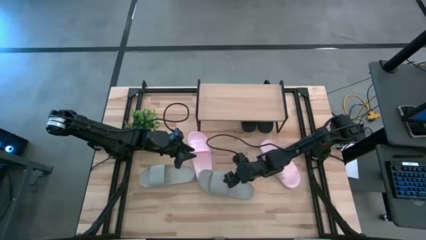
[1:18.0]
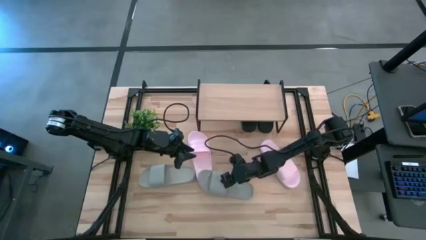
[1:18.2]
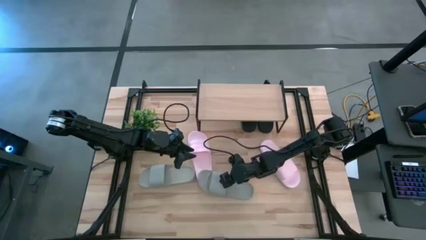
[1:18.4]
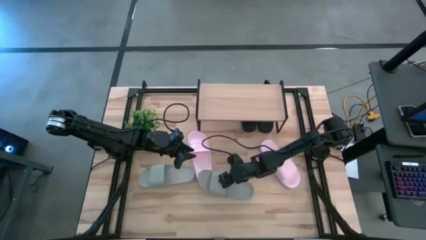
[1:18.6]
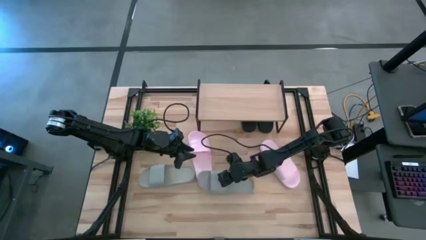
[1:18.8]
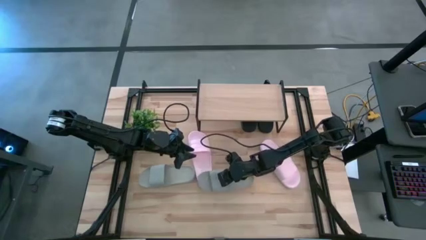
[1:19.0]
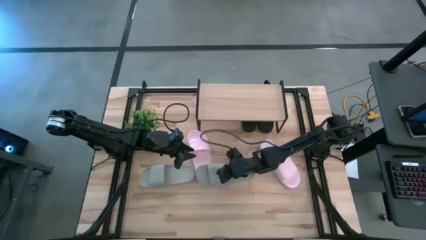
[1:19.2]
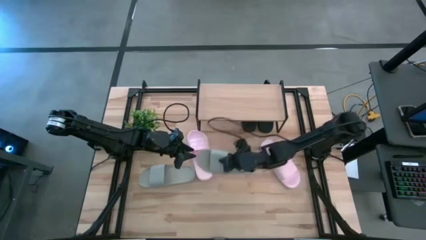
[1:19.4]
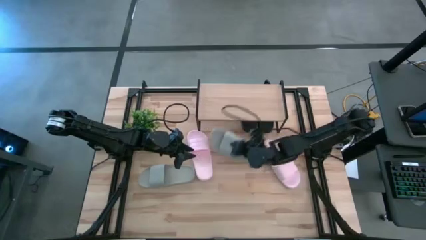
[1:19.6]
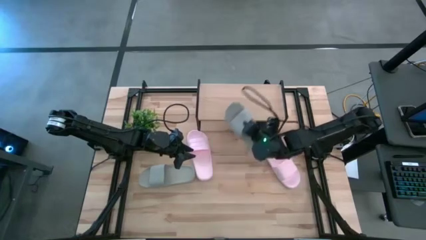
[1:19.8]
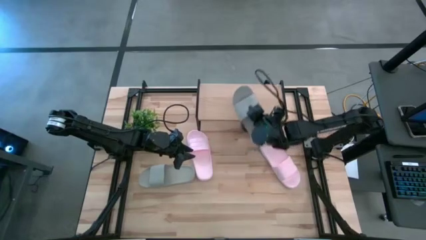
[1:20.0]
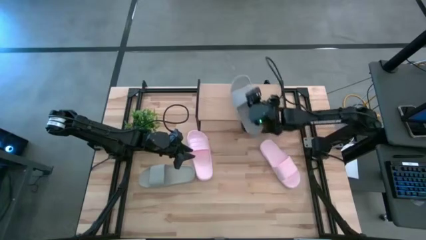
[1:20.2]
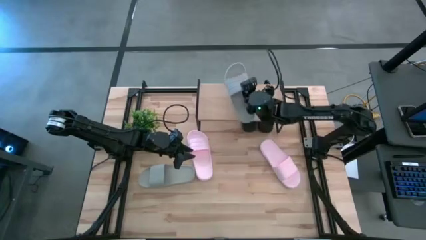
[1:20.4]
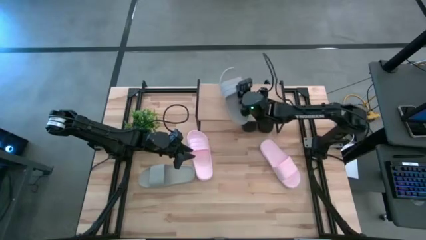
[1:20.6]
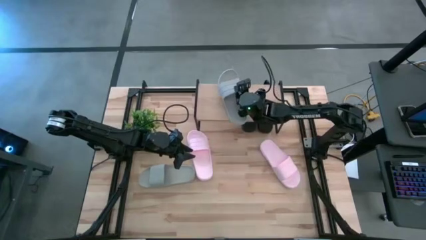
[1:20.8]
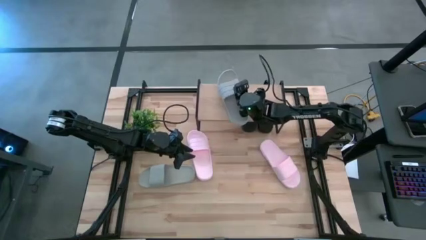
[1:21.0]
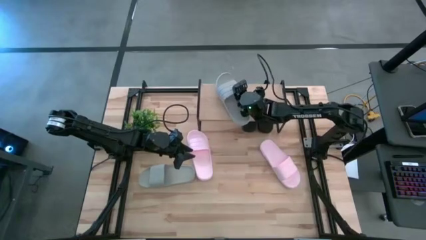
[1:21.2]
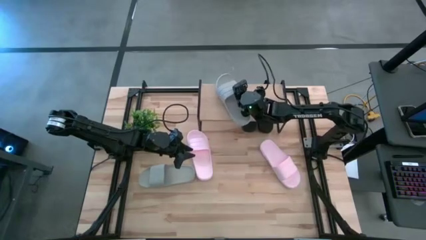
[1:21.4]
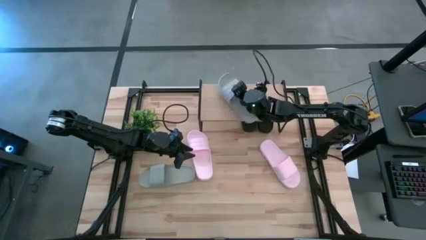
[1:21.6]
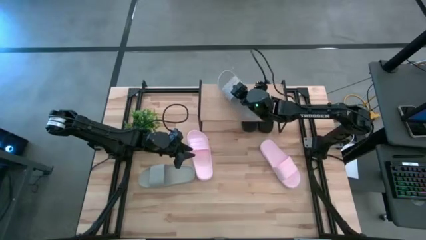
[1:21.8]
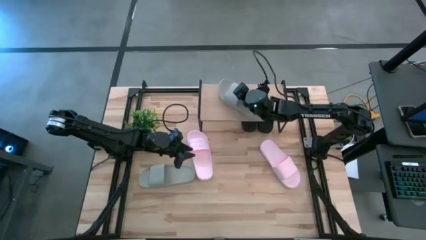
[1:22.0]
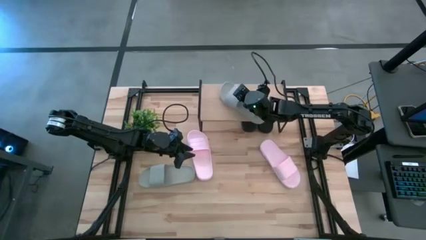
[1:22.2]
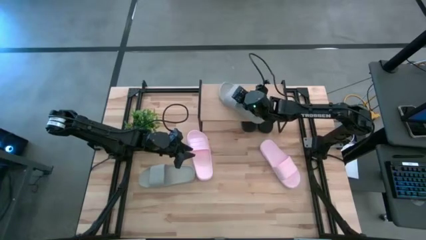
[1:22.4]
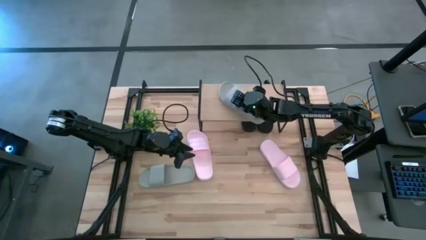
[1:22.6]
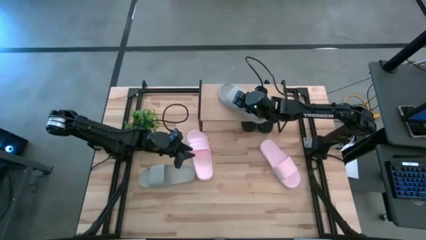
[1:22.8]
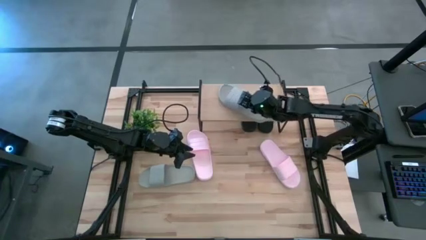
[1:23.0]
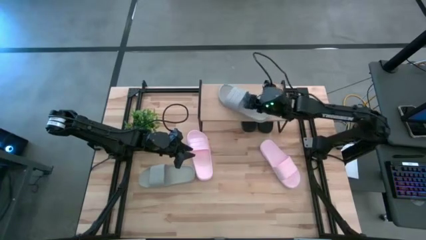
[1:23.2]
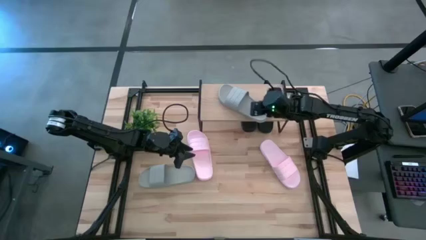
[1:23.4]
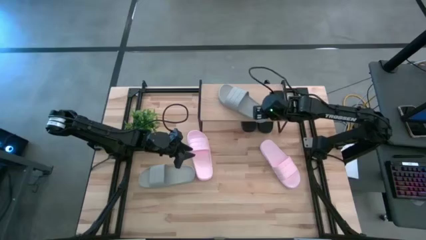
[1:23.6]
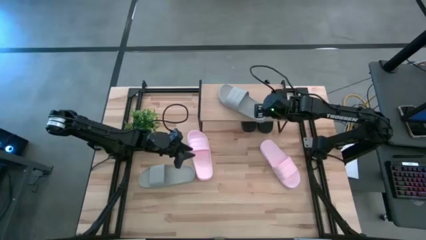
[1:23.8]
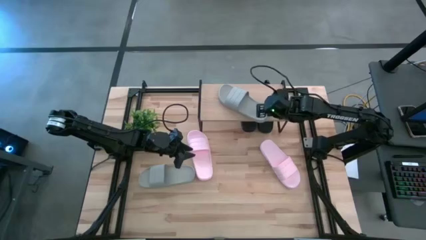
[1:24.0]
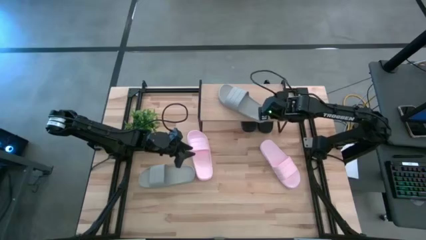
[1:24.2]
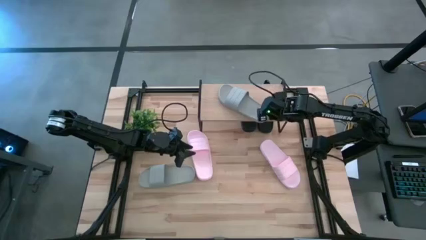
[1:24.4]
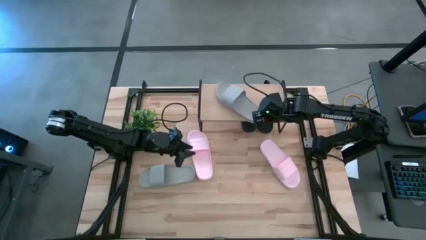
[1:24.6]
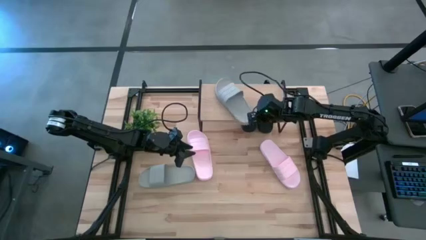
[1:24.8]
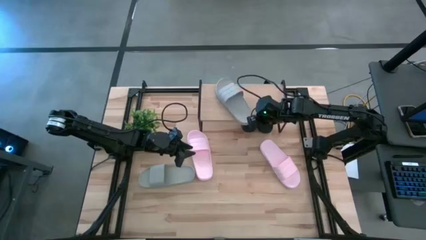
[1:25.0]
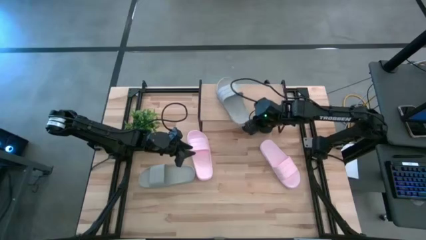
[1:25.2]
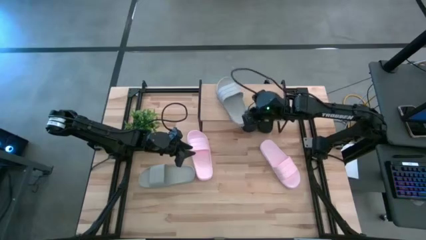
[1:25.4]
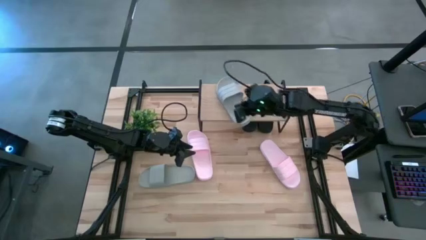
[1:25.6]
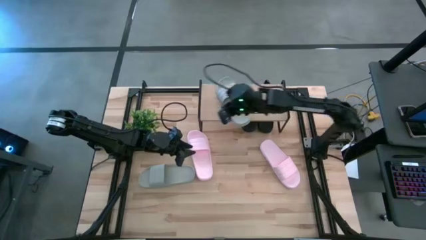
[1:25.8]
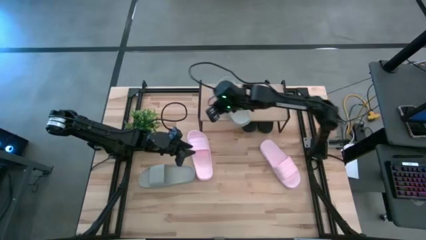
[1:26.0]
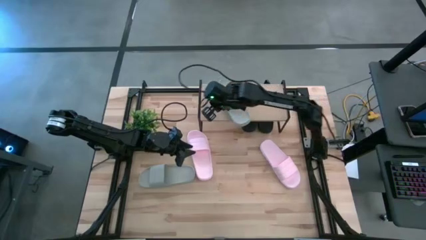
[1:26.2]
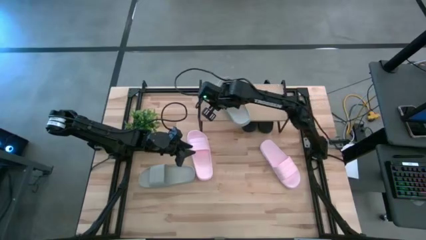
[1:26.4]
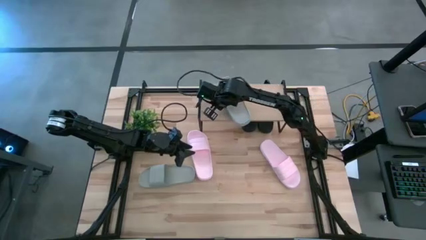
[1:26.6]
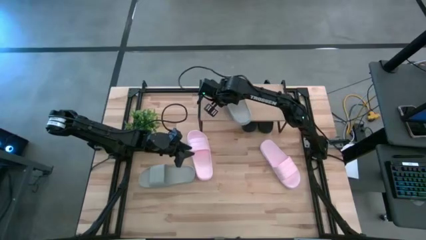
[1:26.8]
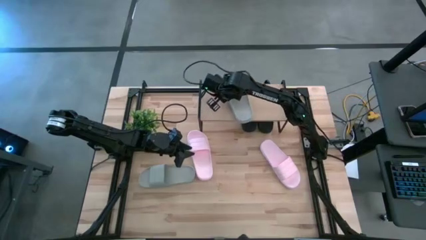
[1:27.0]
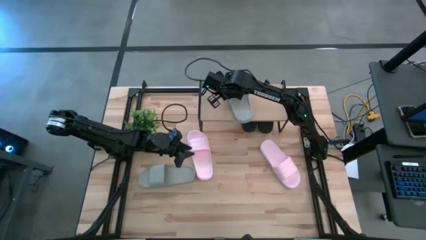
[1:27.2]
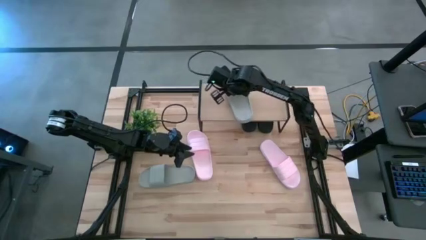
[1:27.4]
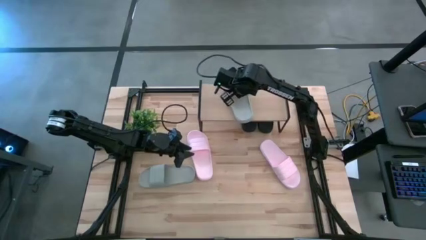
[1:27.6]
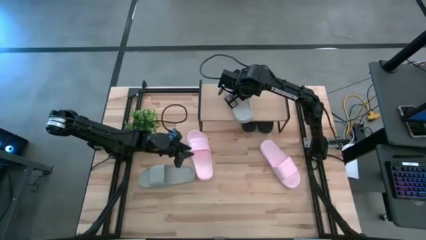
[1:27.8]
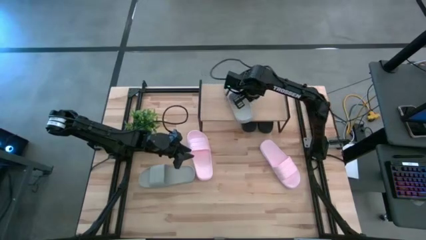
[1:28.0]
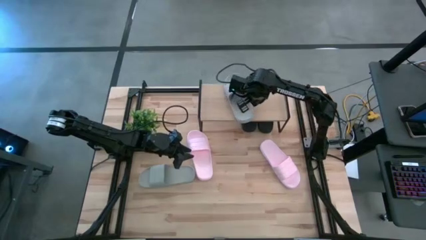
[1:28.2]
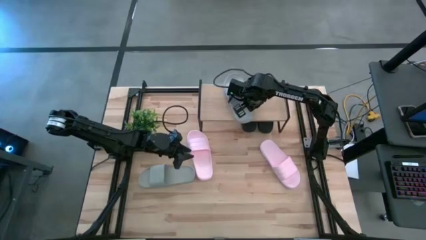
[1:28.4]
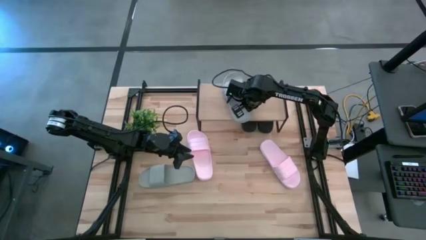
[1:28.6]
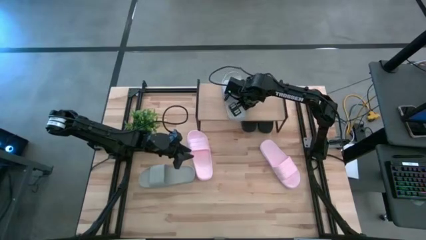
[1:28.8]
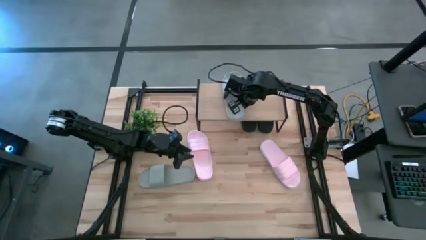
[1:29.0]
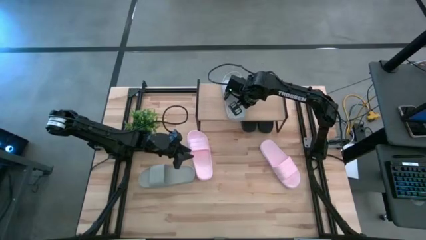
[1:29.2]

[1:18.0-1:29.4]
Task: Pick and place slides into the shelf
Put the bottom gray slipper on the shelf
